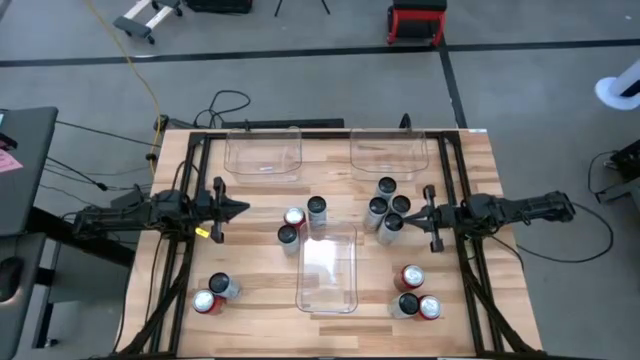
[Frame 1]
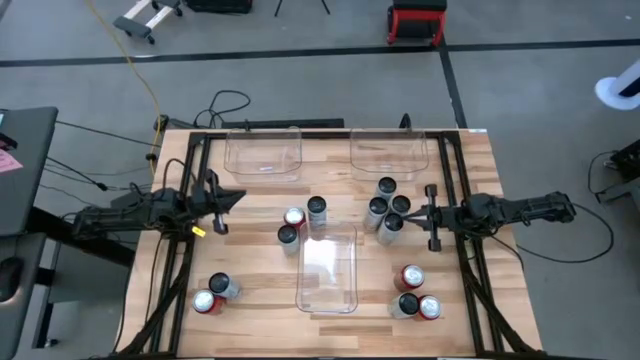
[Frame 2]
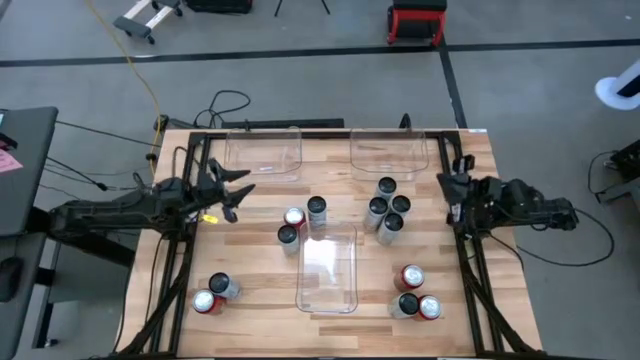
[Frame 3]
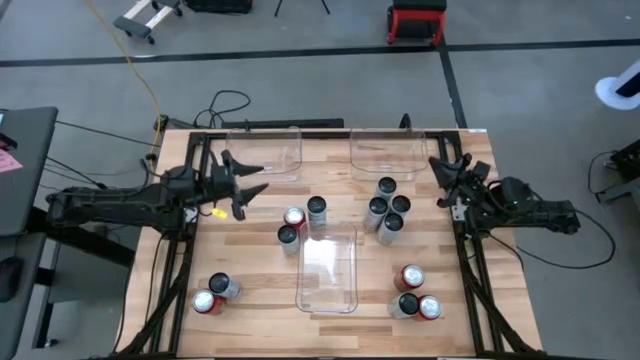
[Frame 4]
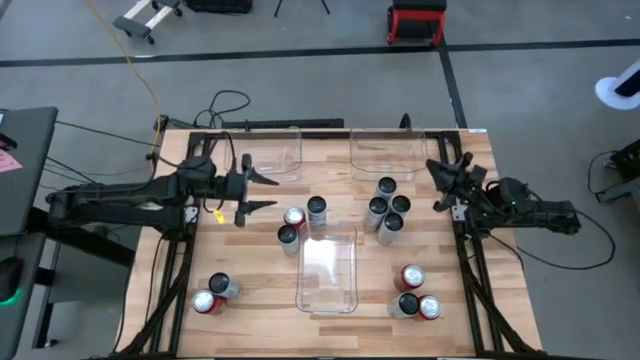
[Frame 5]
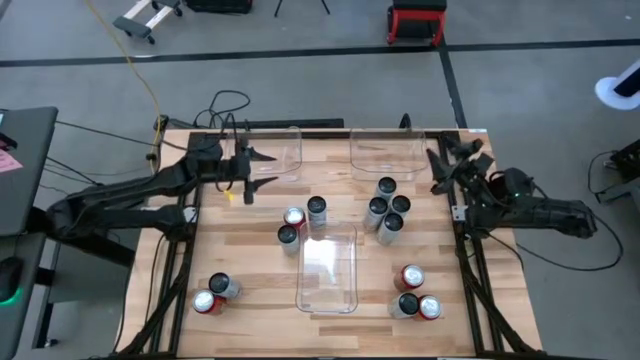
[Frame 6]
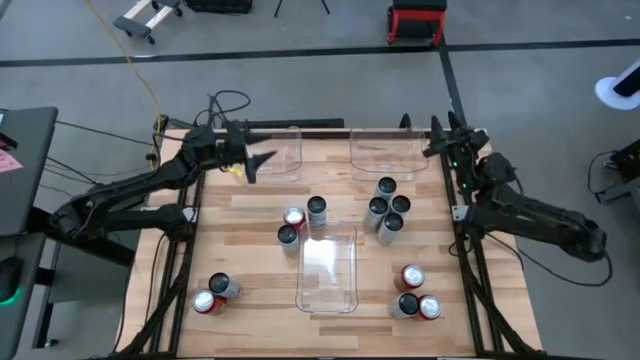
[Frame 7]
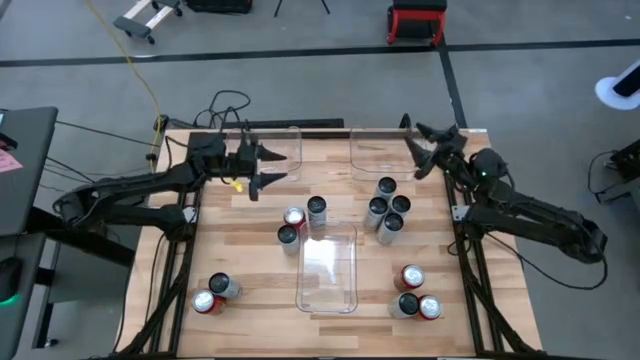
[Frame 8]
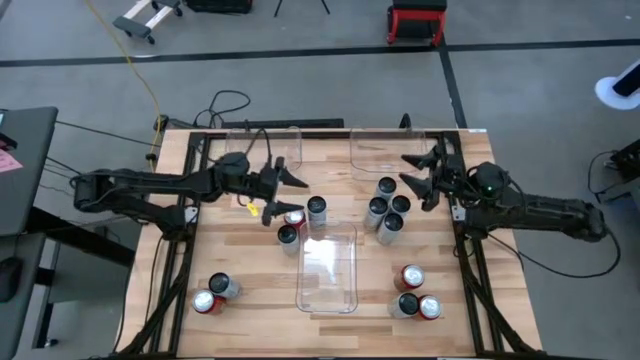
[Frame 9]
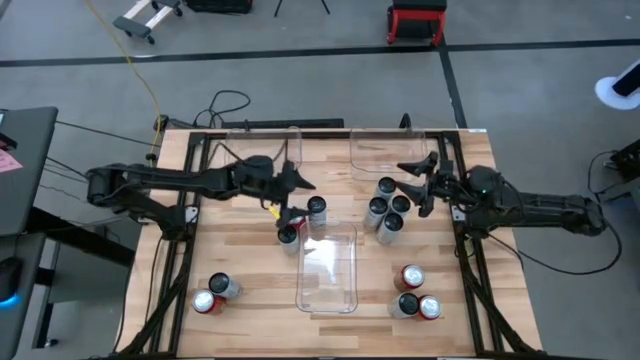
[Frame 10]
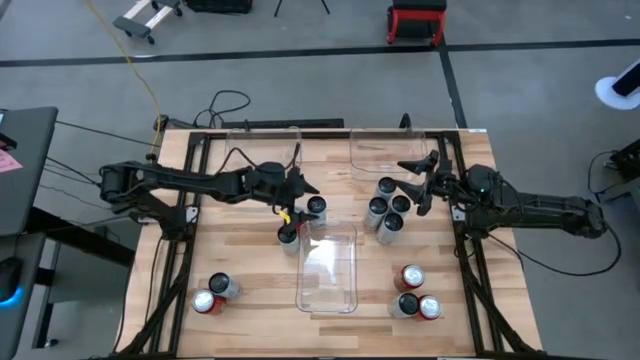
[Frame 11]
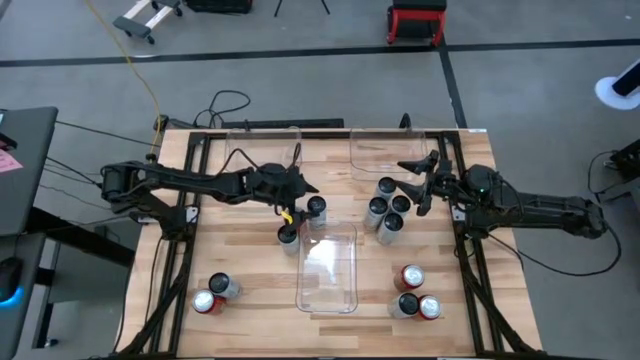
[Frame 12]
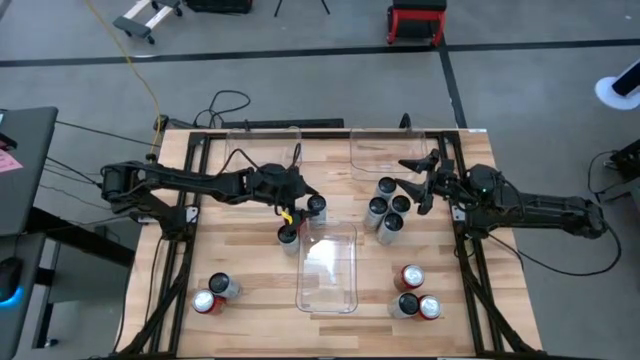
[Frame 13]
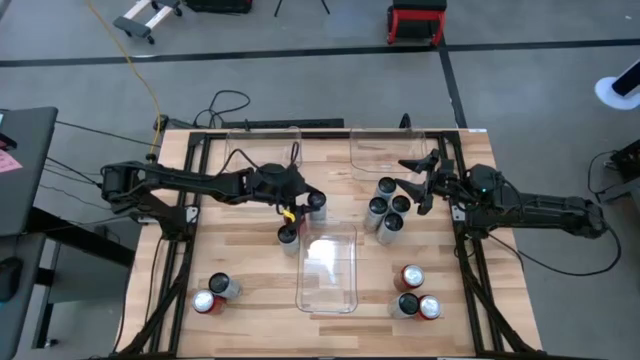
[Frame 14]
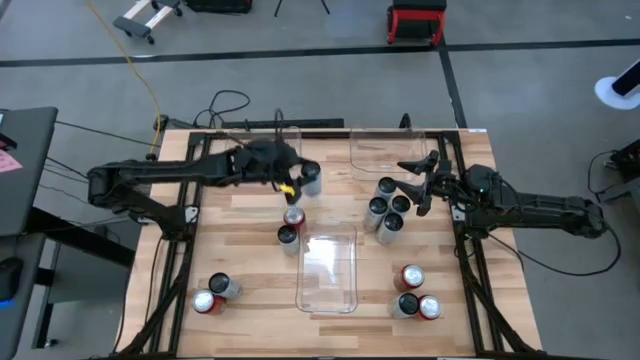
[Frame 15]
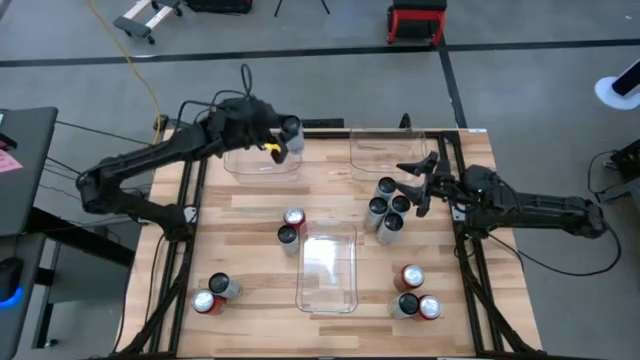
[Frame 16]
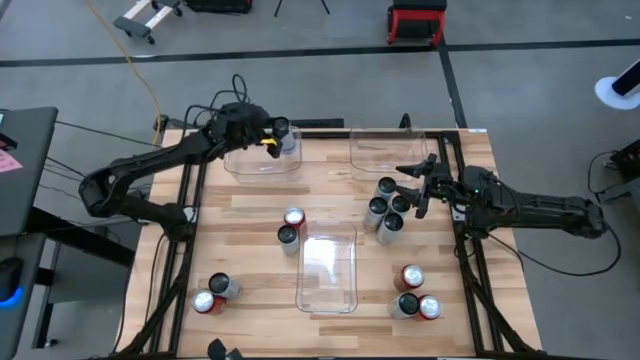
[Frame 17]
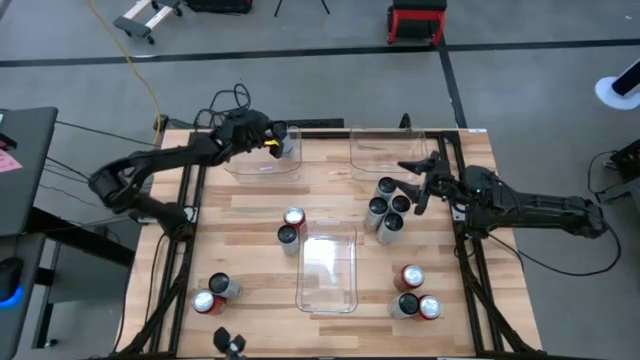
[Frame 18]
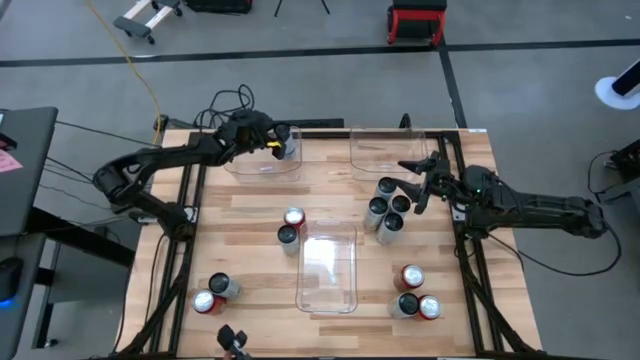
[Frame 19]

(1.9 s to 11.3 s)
Task: Sort soda cans
Put the white-blue soda can into the top left transparent bin

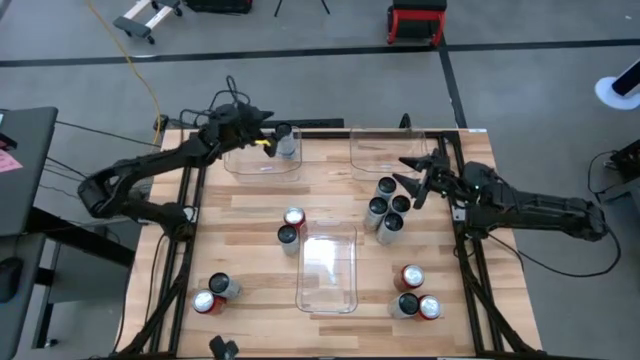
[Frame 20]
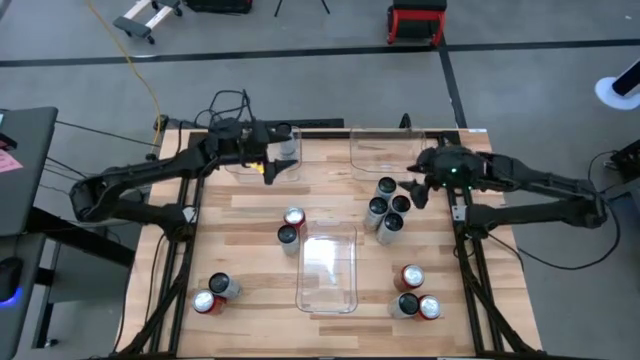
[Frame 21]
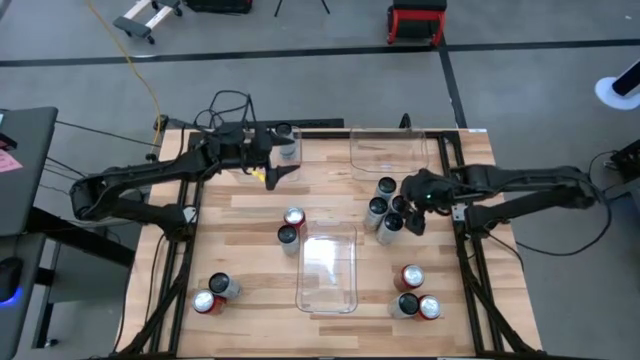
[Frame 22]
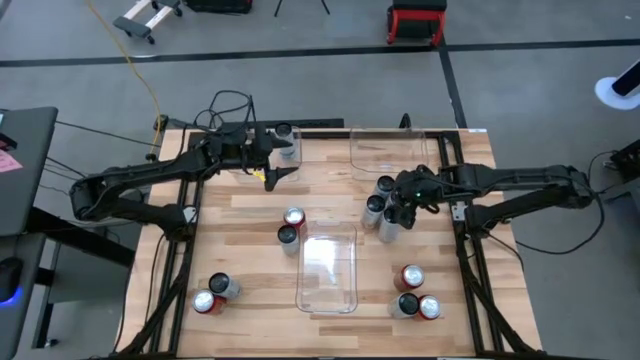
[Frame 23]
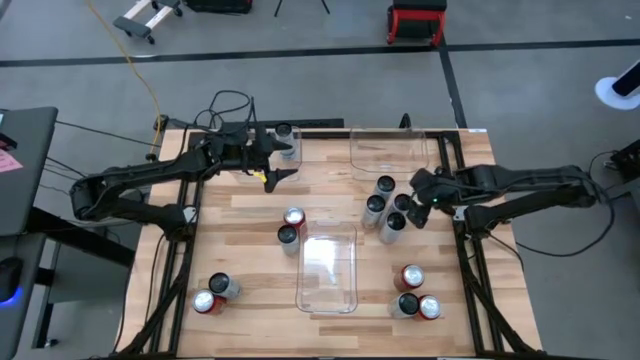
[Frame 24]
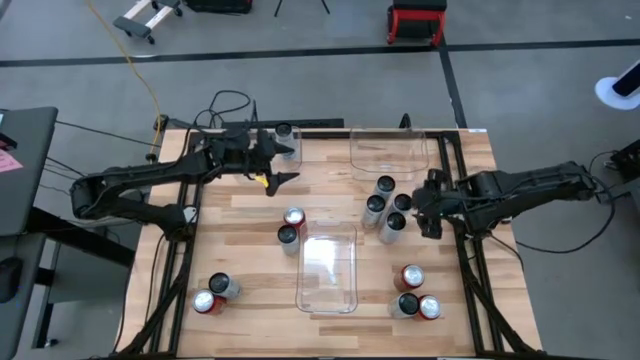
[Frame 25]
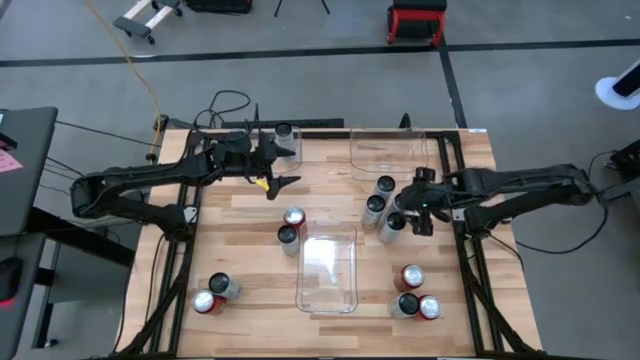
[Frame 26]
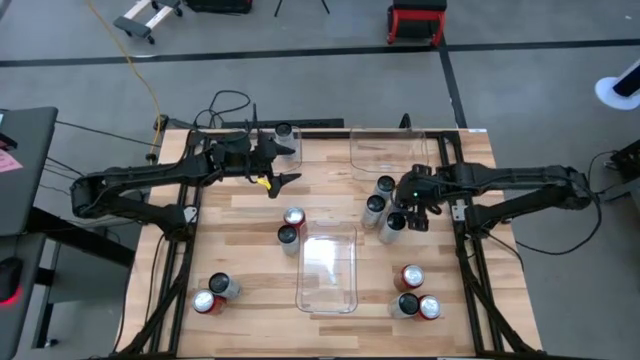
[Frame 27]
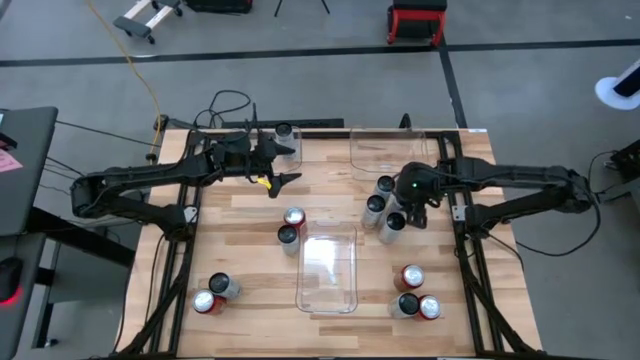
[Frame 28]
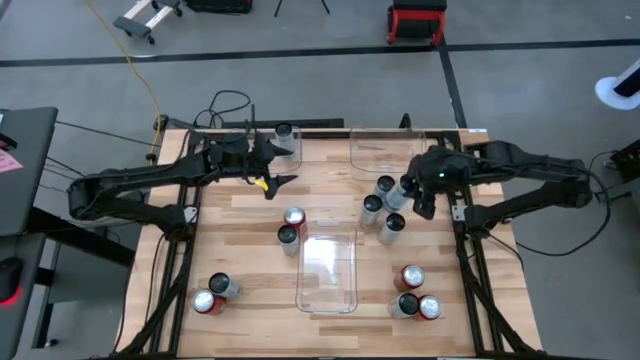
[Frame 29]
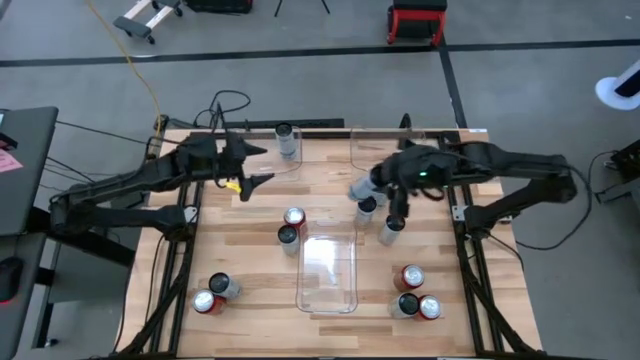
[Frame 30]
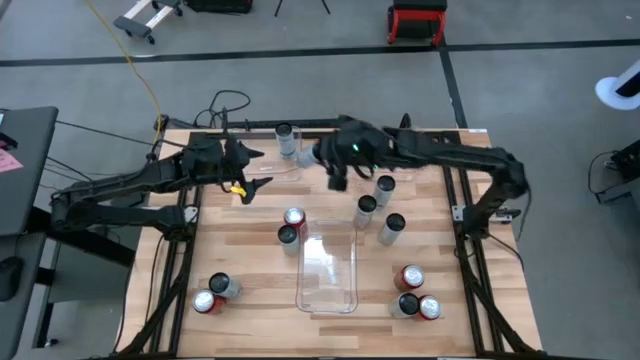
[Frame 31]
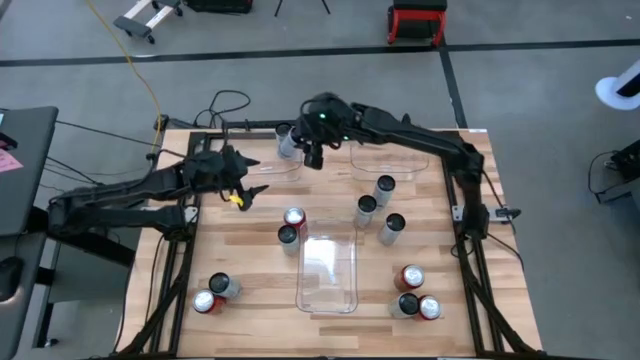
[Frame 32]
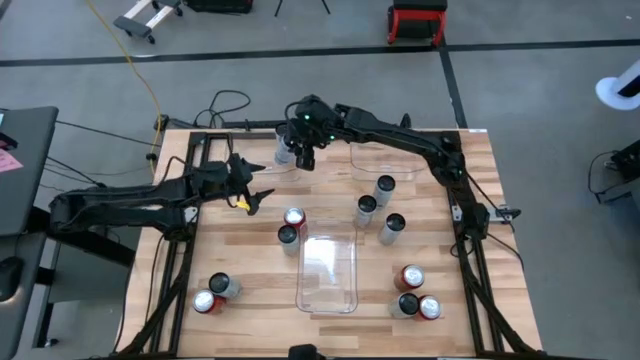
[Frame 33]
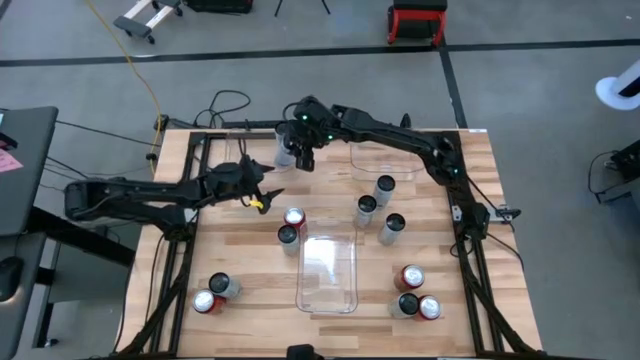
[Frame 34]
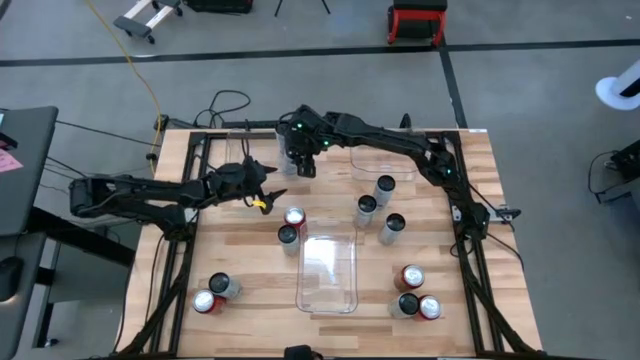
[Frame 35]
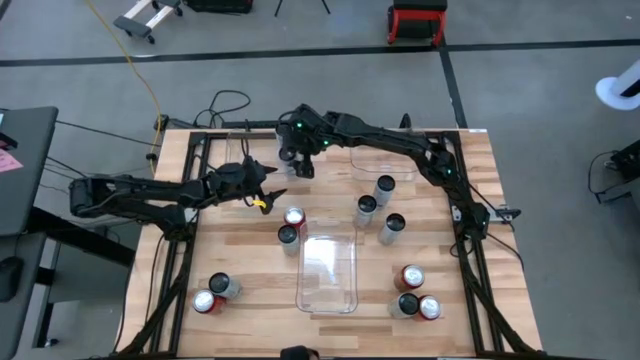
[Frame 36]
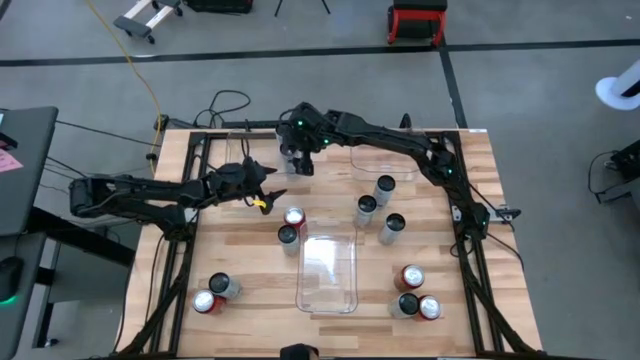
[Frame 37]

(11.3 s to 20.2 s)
Put the white-blue soda can into the top left transparent bin

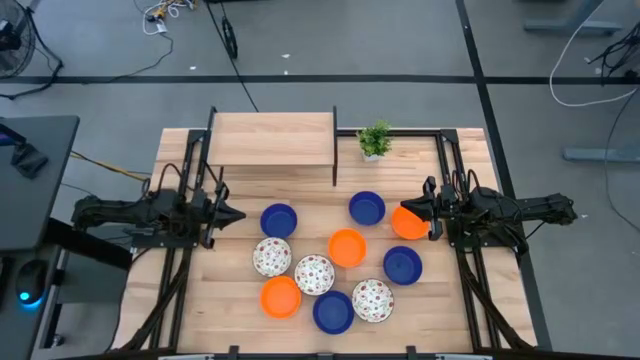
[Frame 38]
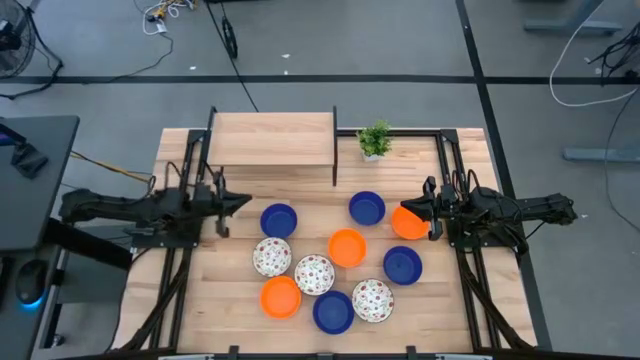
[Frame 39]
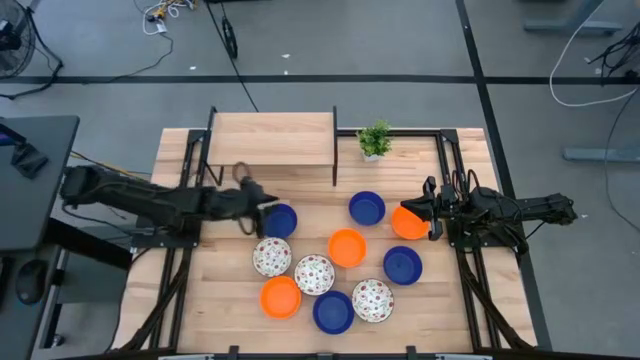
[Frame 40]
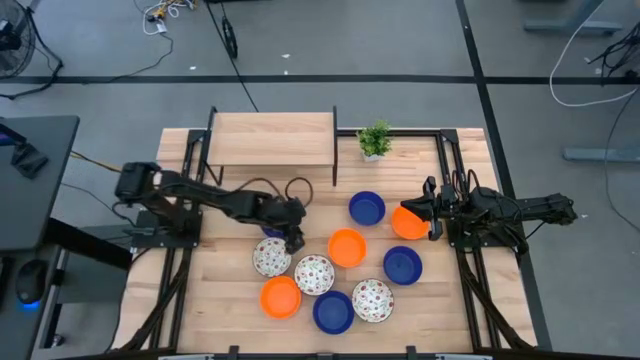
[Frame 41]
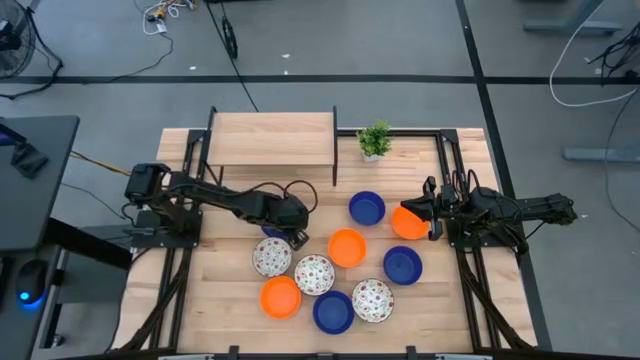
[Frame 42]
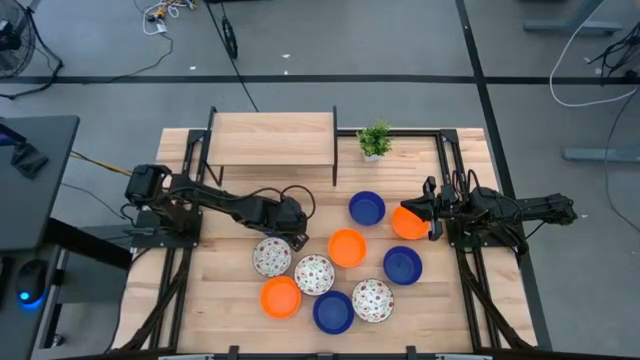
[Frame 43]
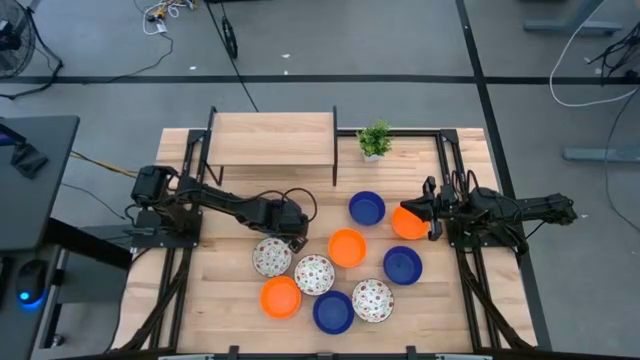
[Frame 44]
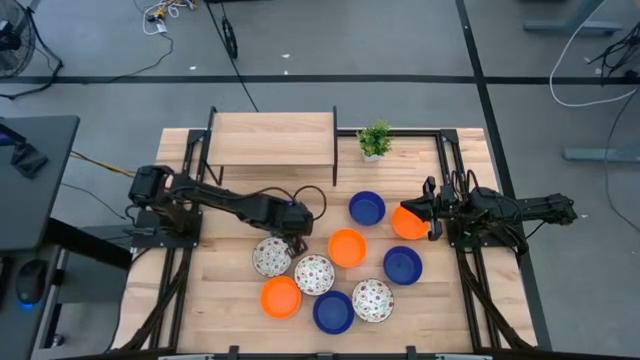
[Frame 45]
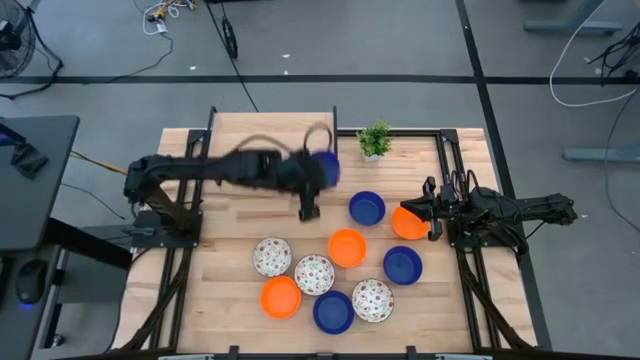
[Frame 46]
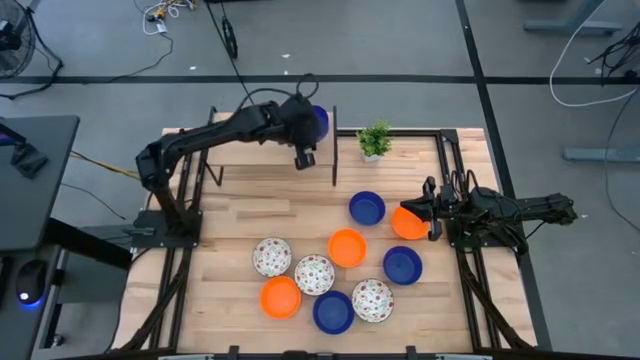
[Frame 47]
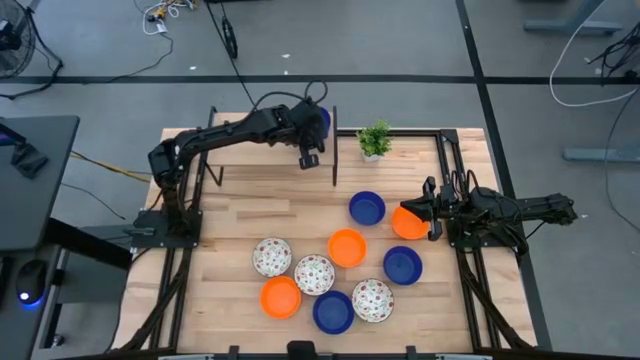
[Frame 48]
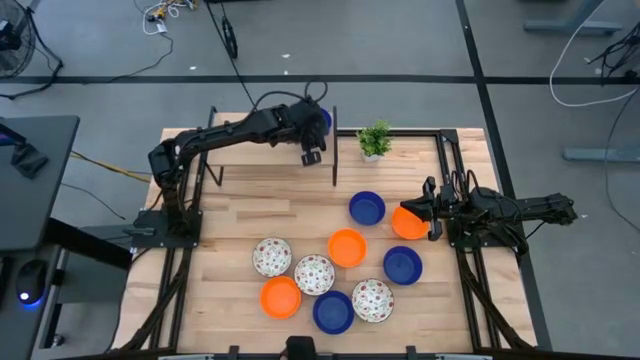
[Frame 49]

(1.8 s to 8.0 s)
Task: Pick & Place Mini bowls
Put the blue bowl on the shelf
